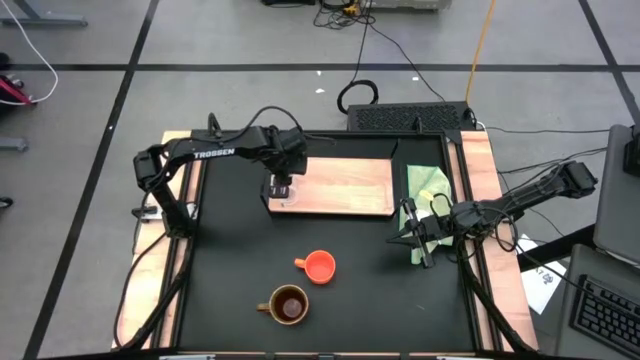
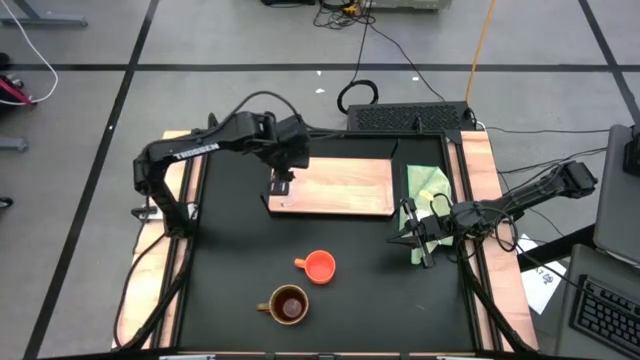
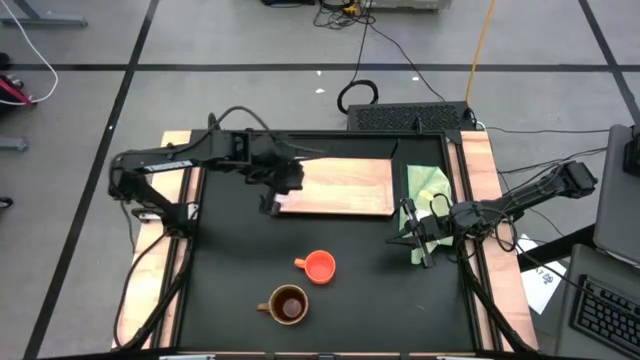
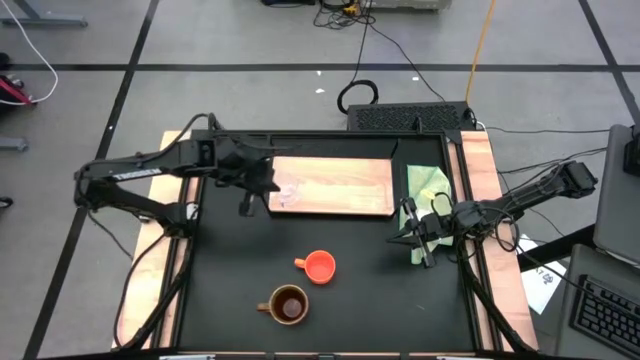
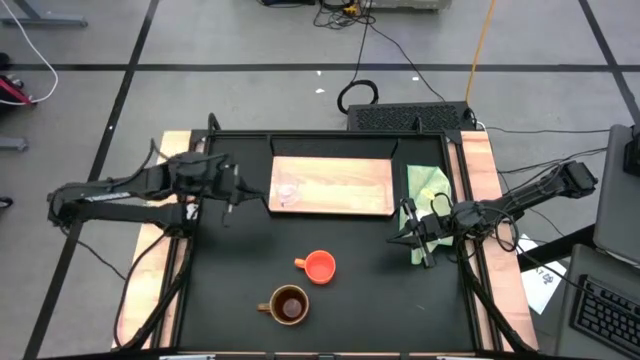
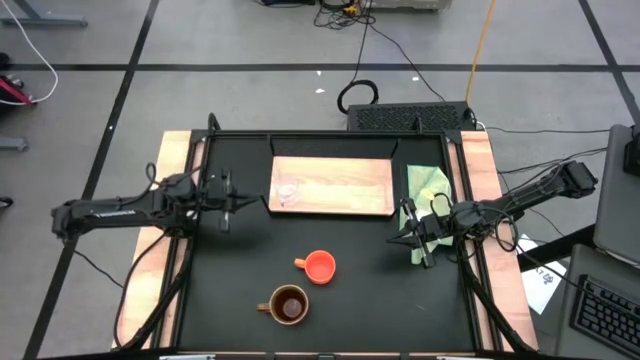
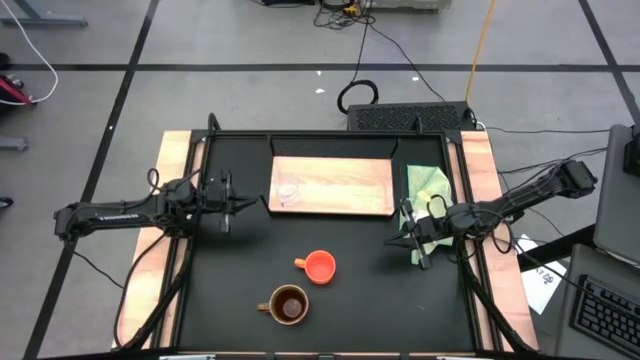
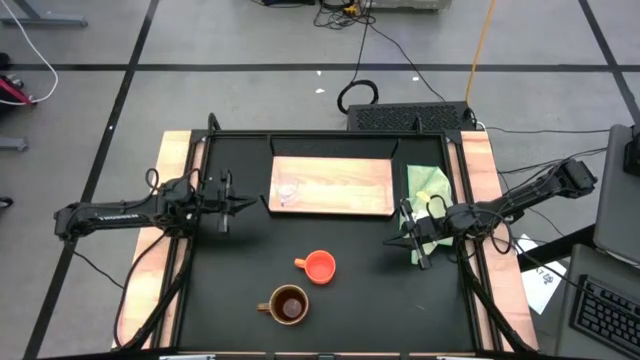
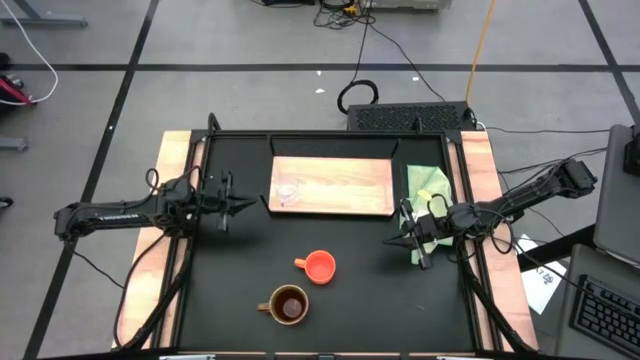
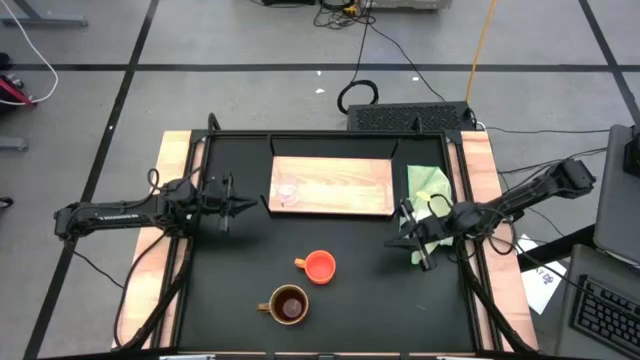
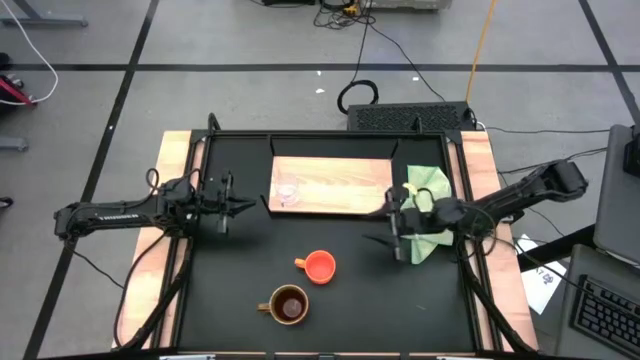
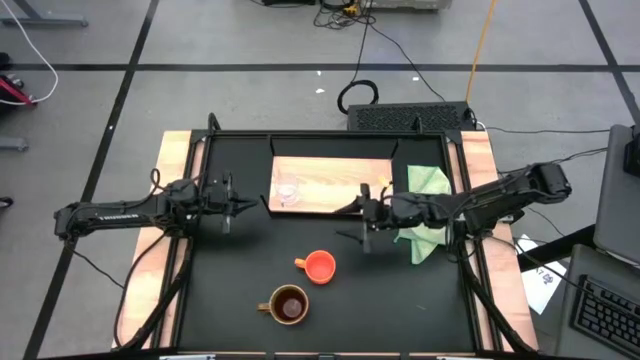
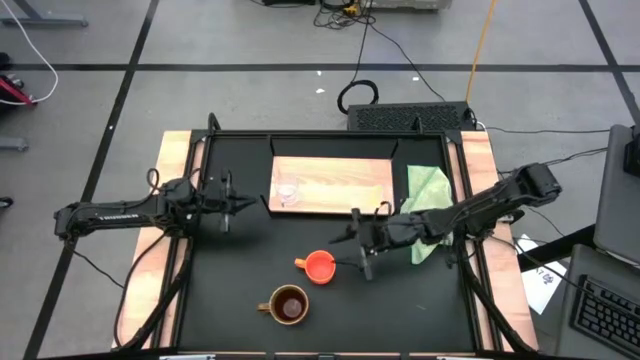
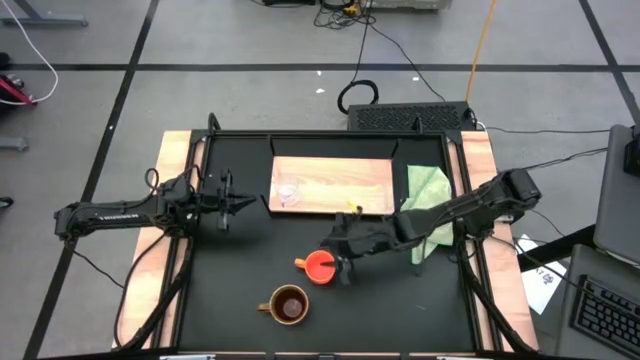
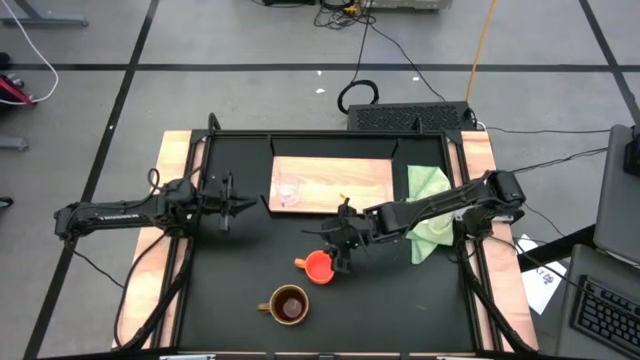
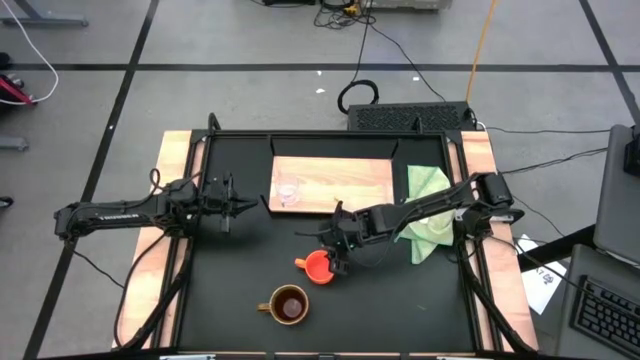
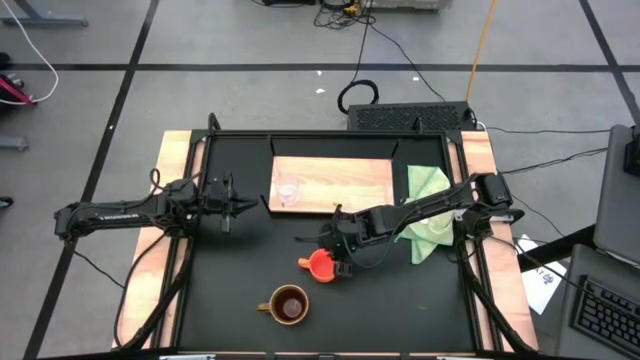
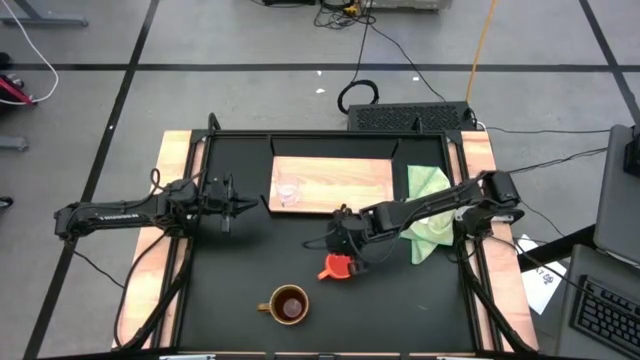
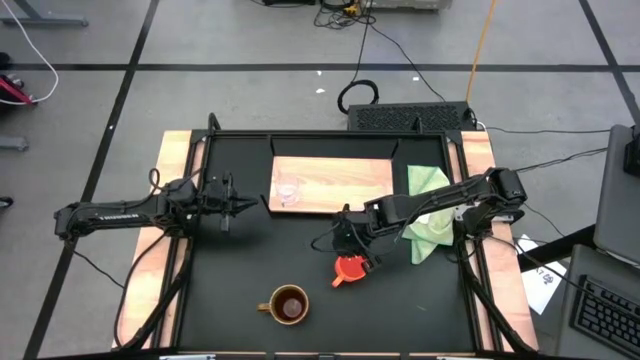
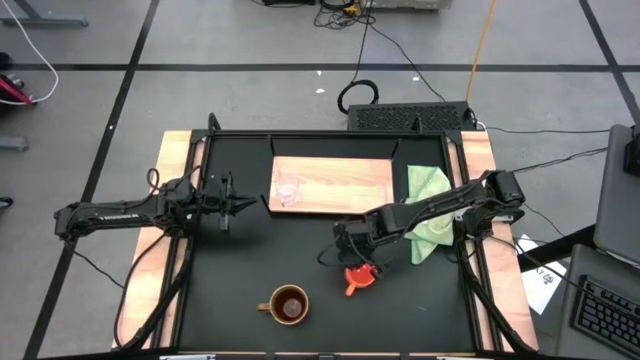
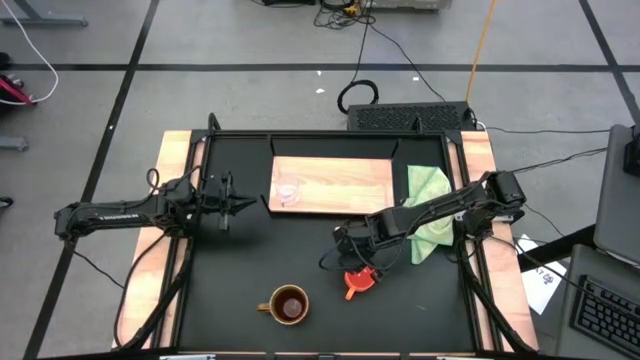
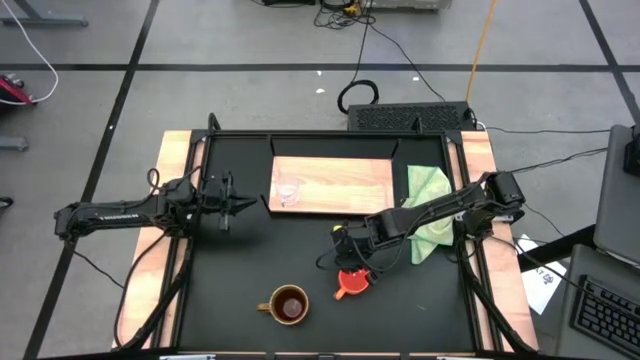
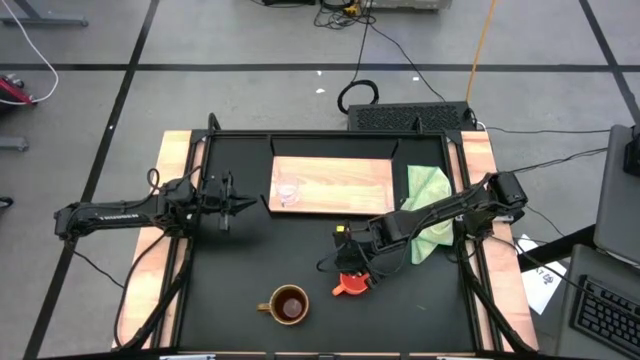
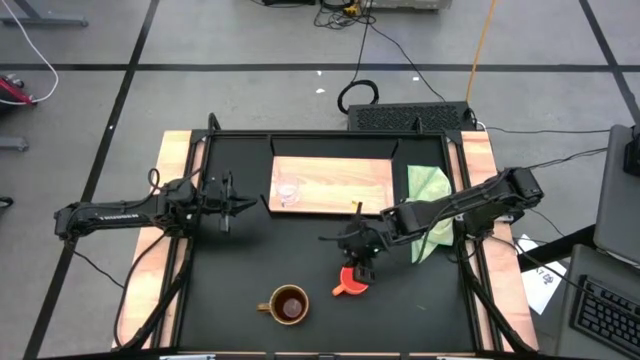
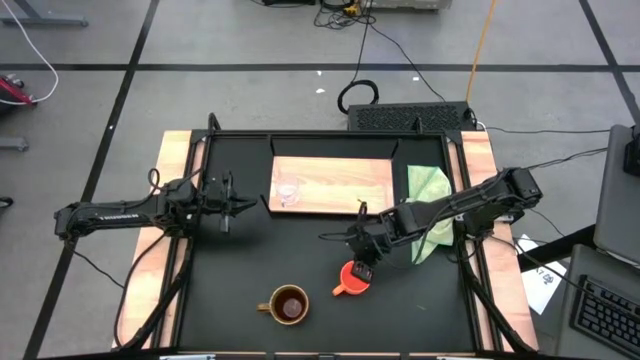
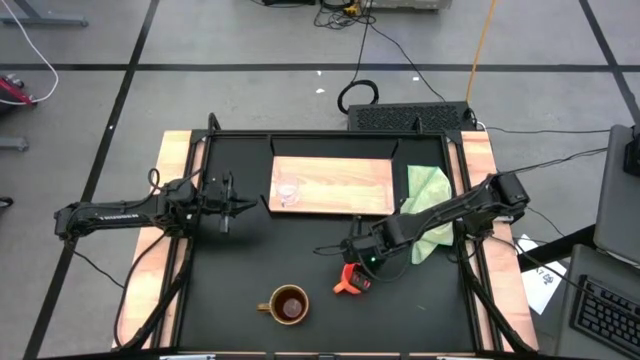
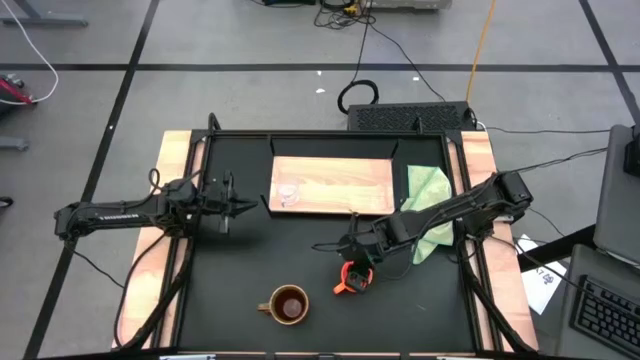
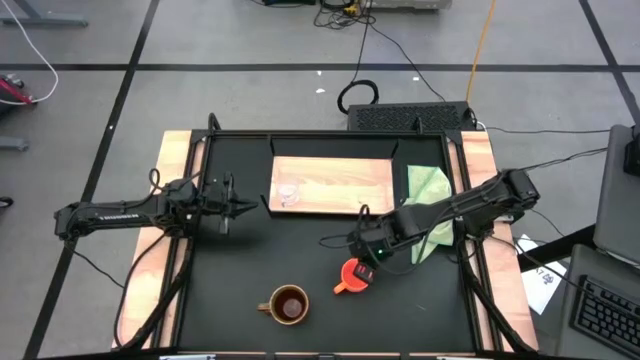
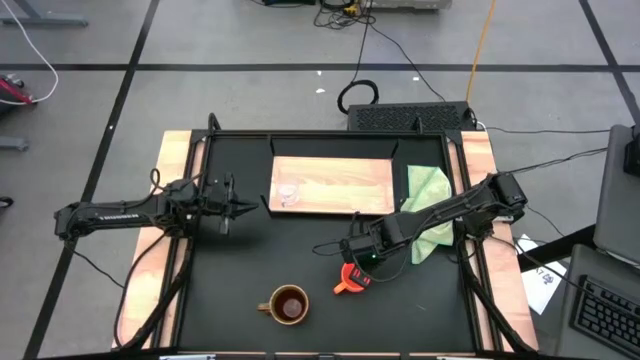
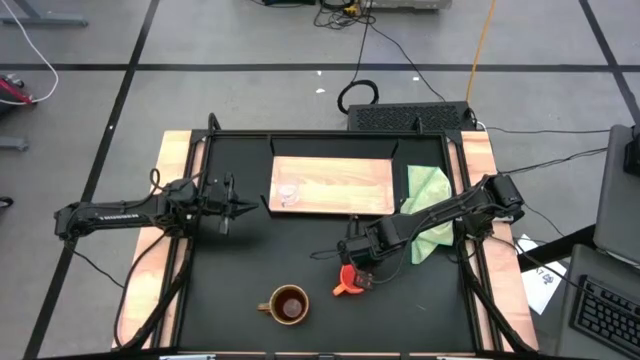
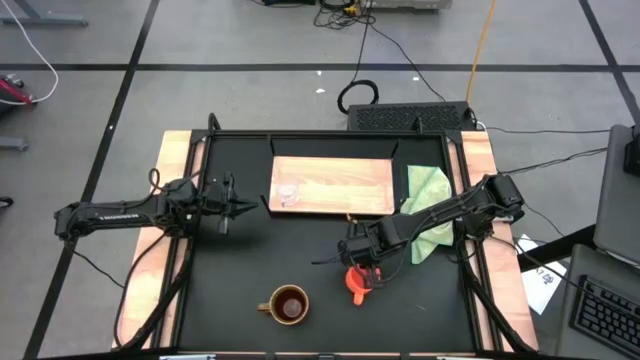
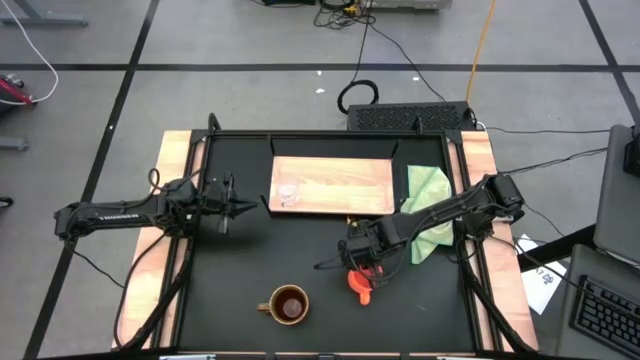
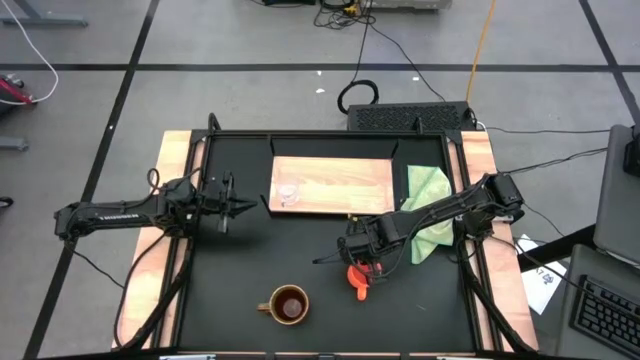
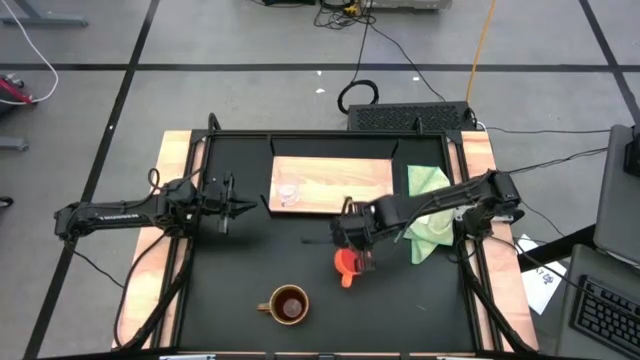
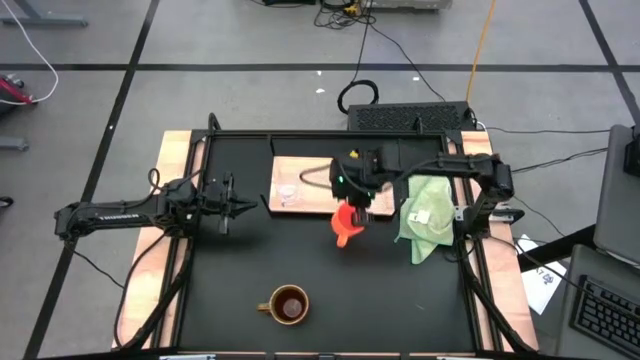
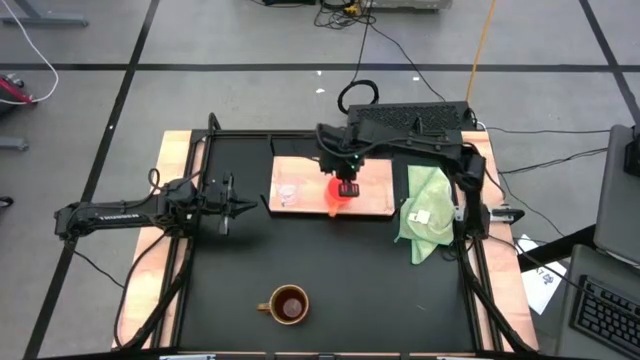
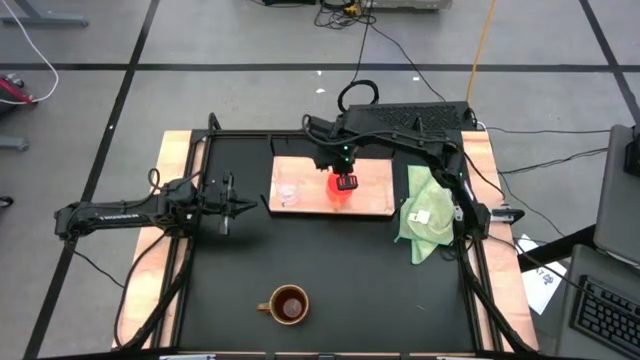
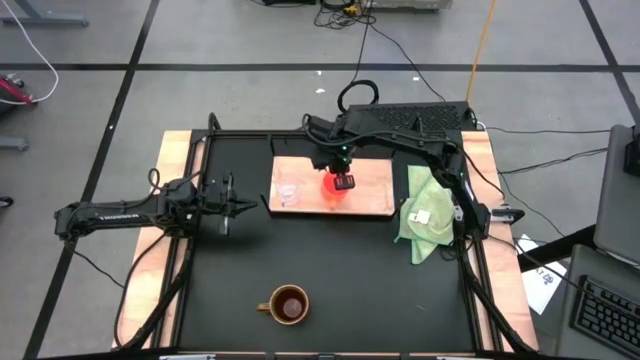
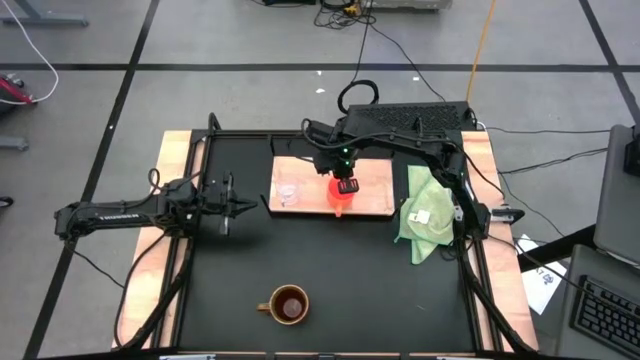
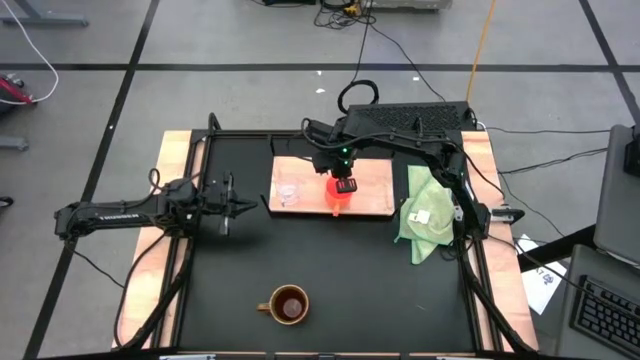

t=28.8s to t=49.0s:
Task: Stack small to large cups/mugs on shelf
Put the orange mug on the shelf

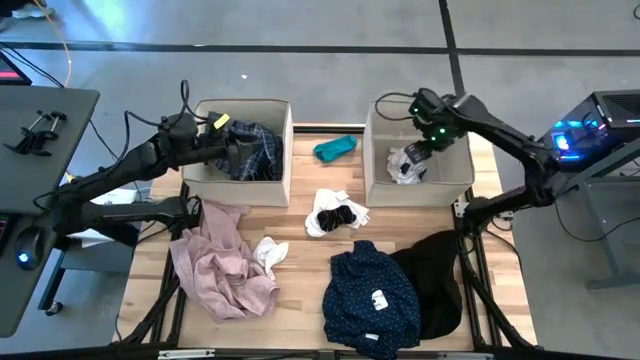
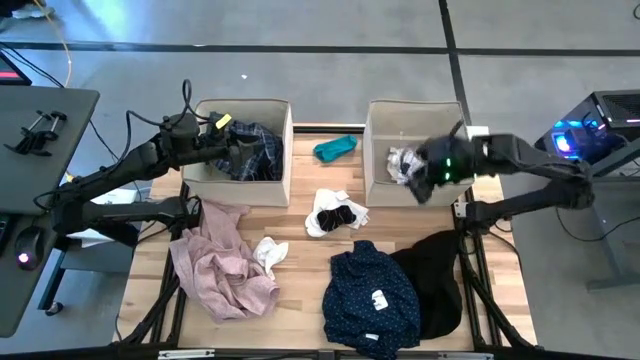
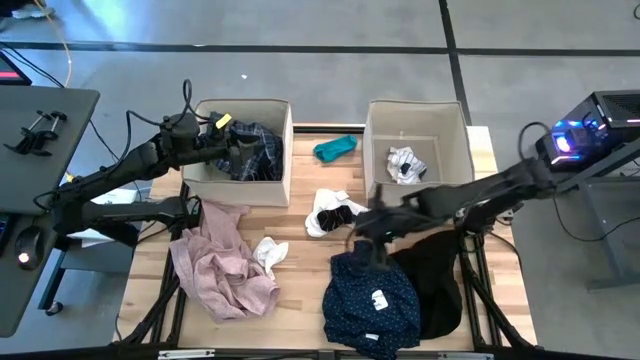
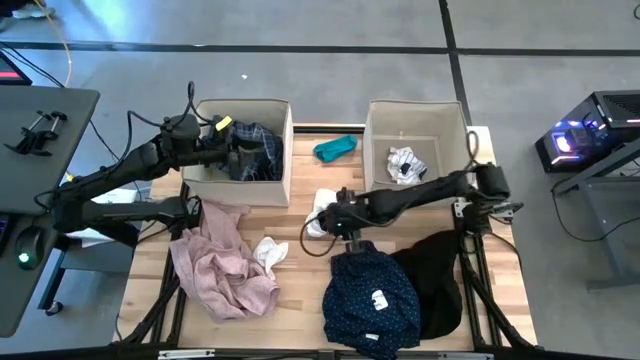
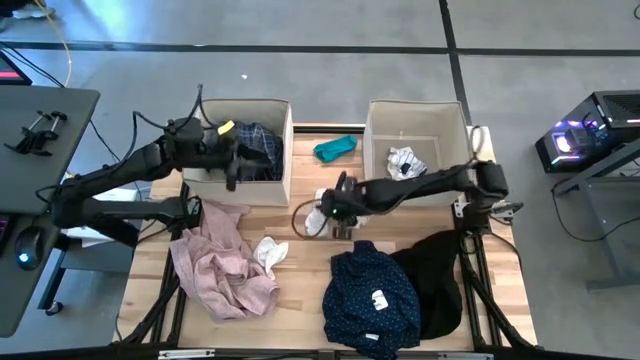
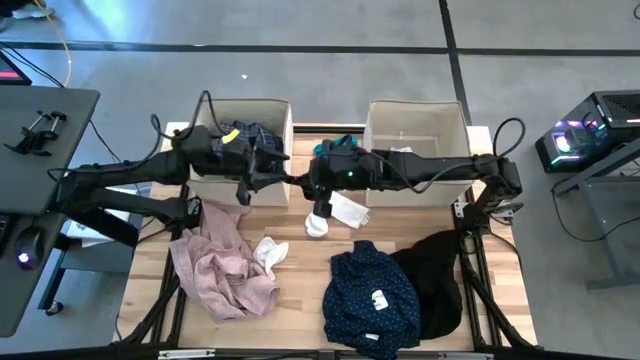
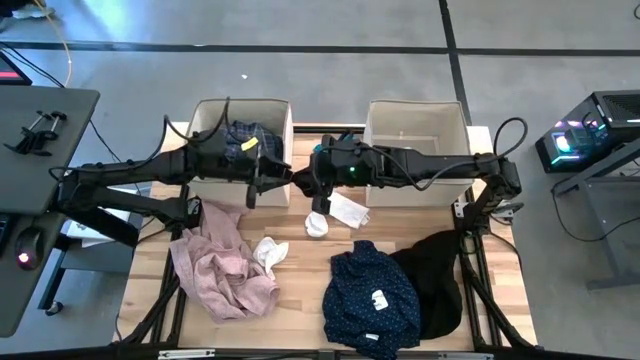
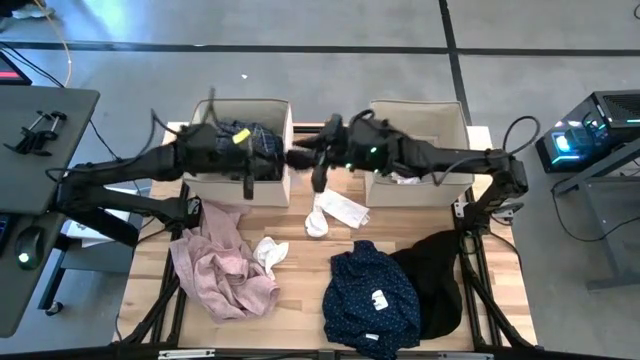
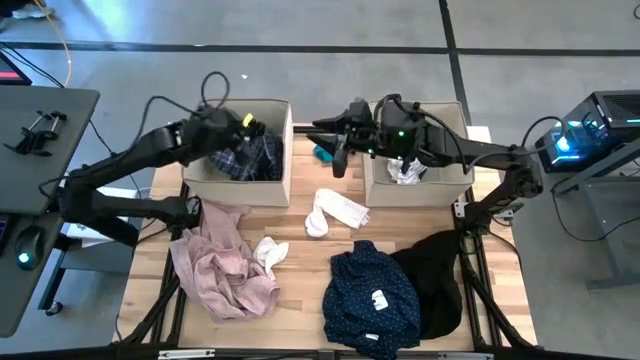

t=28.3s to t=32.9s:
Task: Sort clothes
Put the black striped sock into the left laundry organizer
